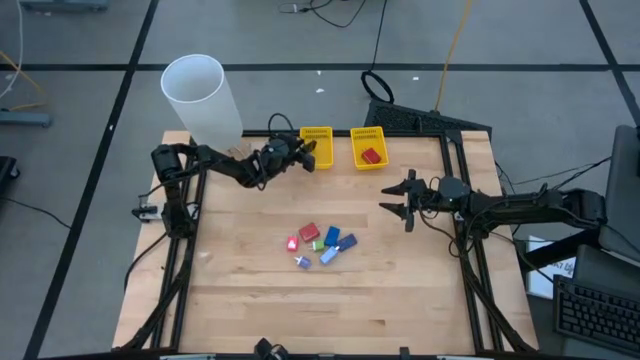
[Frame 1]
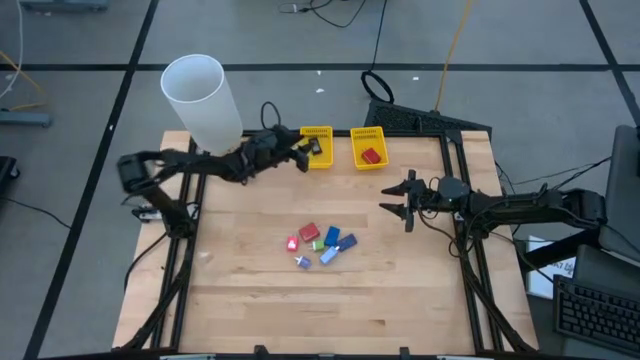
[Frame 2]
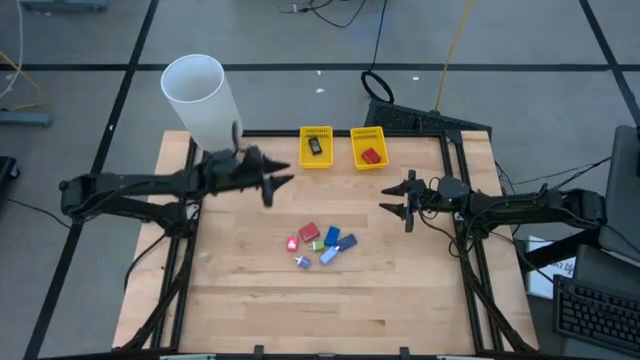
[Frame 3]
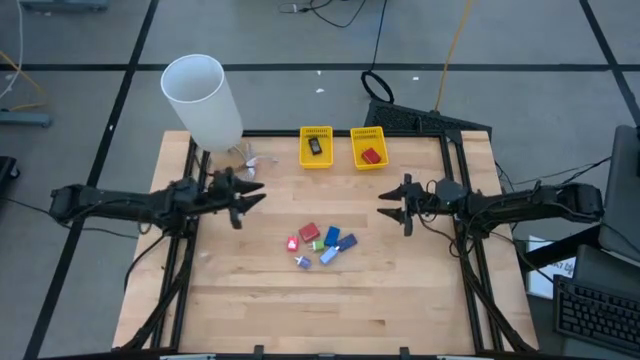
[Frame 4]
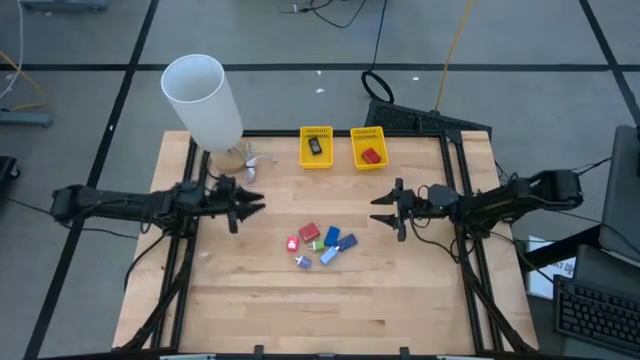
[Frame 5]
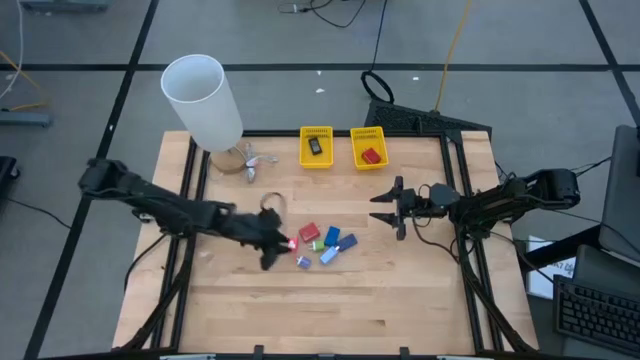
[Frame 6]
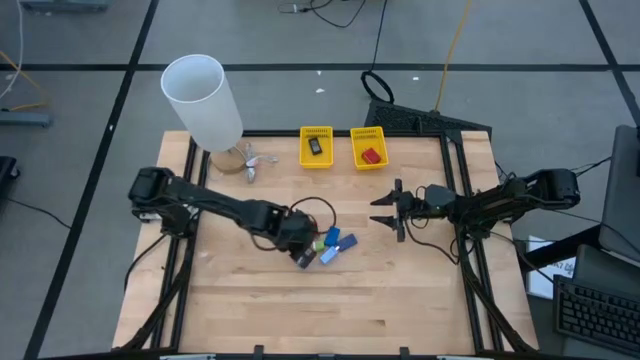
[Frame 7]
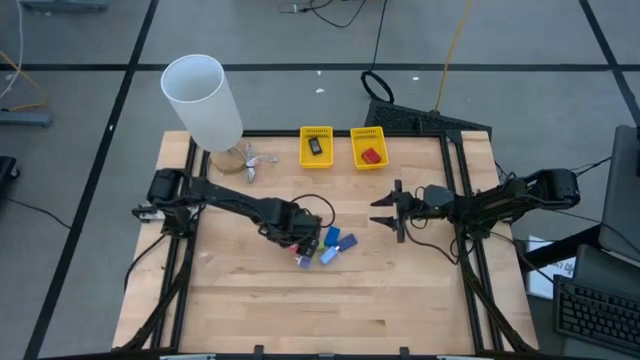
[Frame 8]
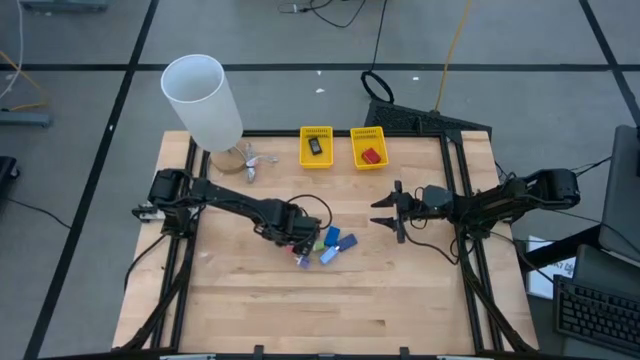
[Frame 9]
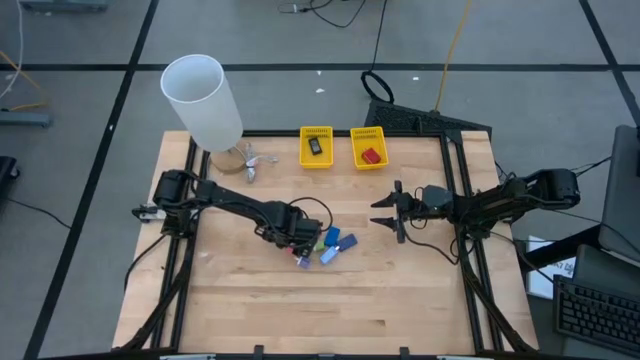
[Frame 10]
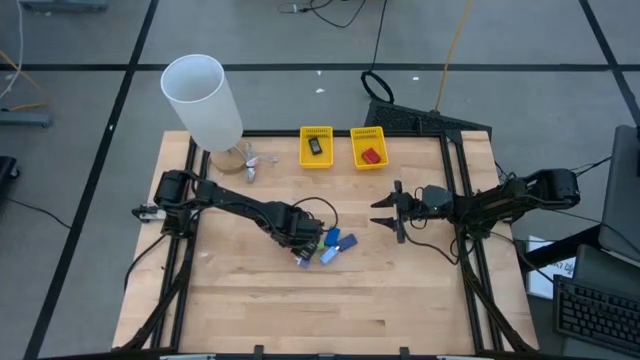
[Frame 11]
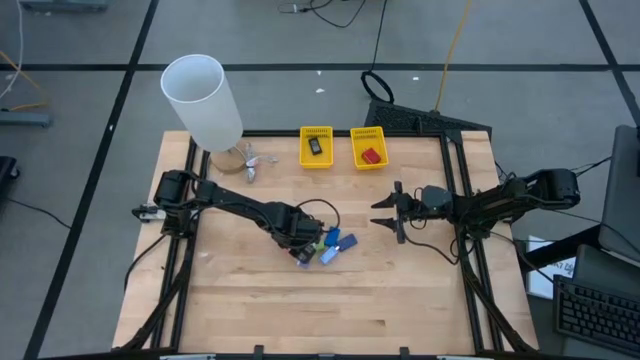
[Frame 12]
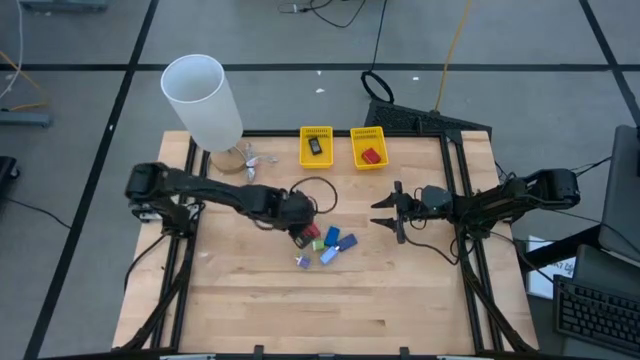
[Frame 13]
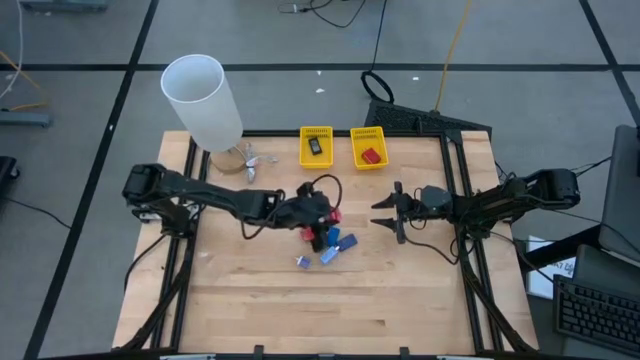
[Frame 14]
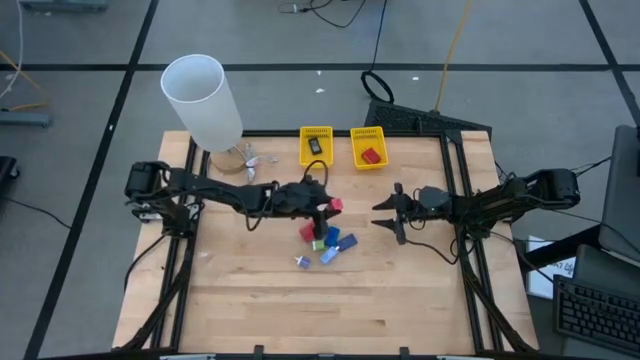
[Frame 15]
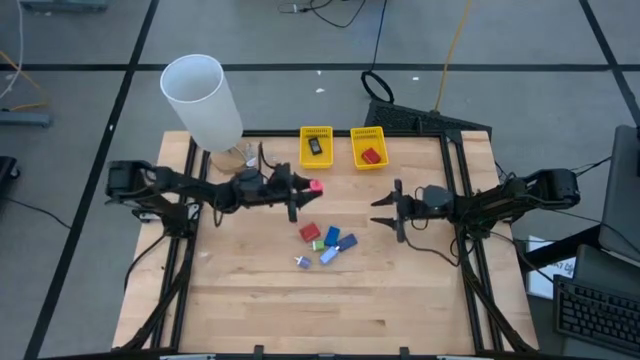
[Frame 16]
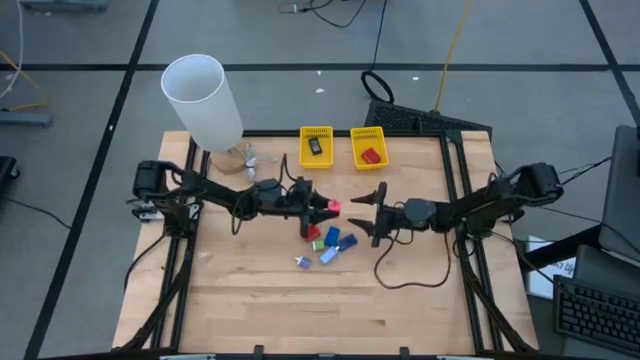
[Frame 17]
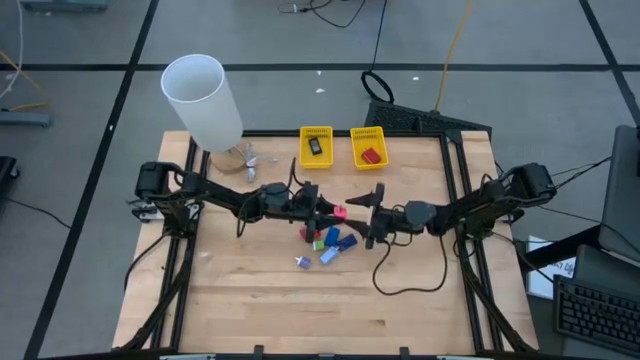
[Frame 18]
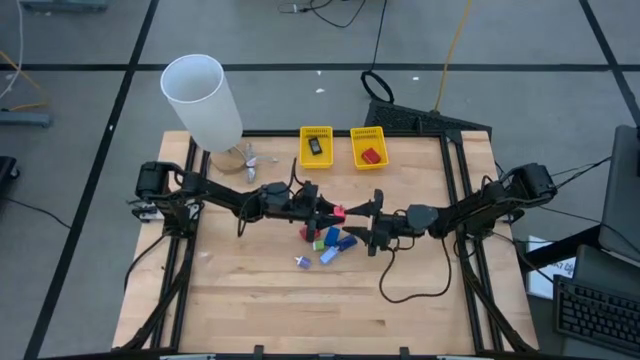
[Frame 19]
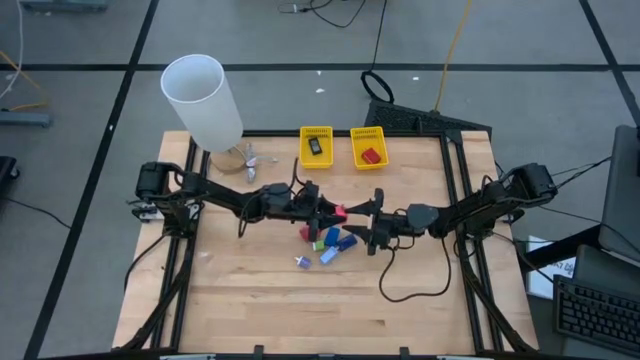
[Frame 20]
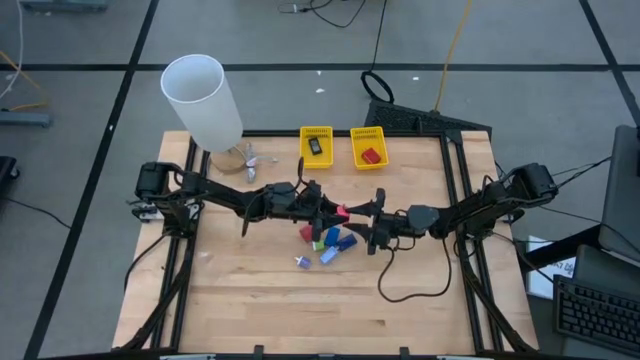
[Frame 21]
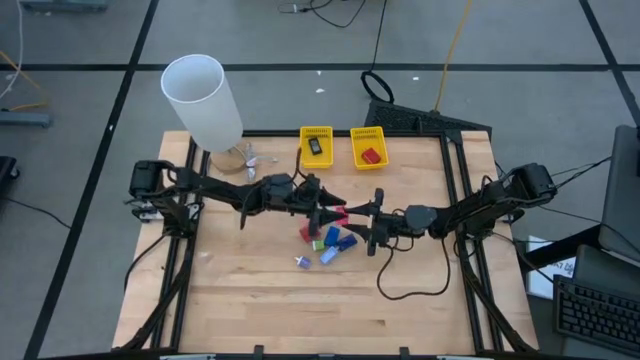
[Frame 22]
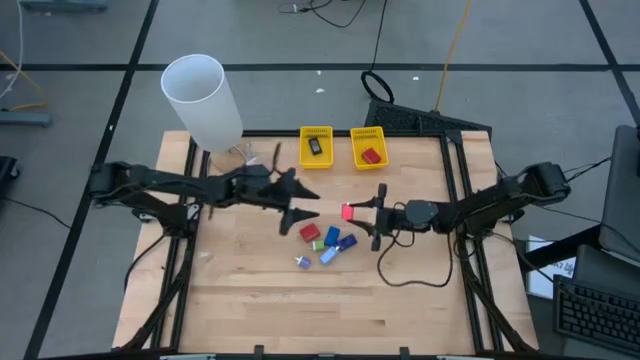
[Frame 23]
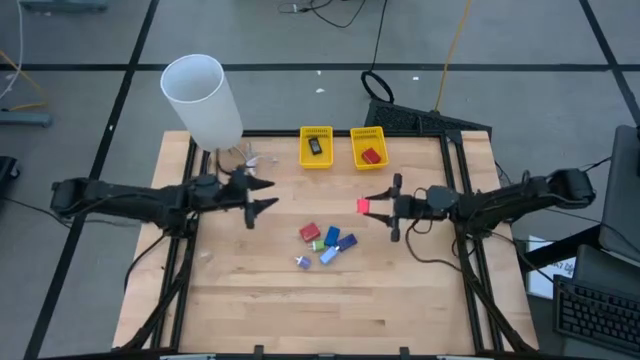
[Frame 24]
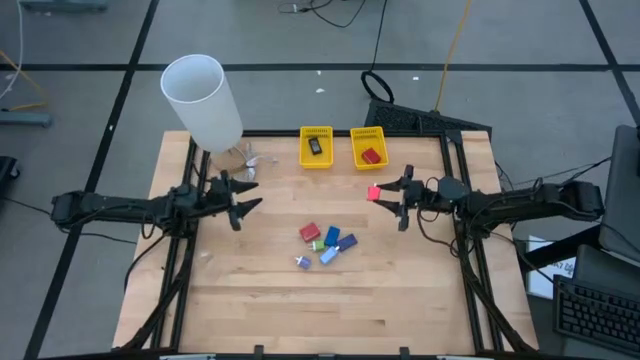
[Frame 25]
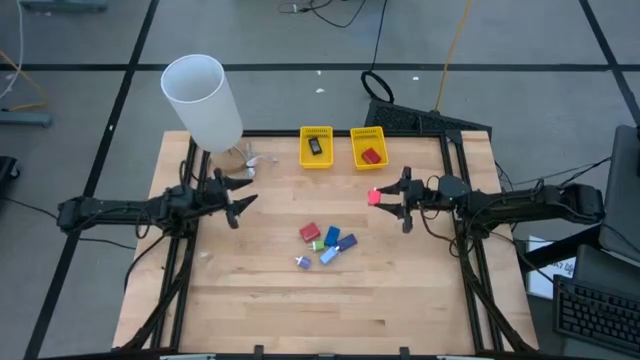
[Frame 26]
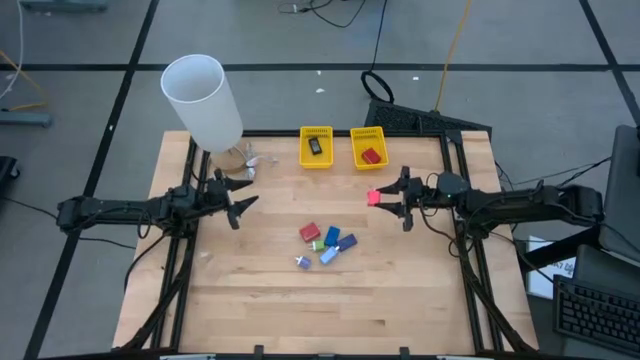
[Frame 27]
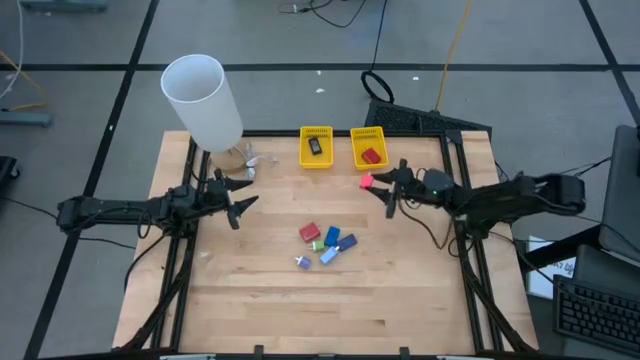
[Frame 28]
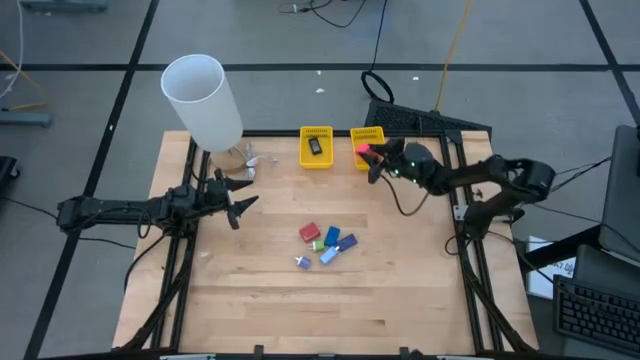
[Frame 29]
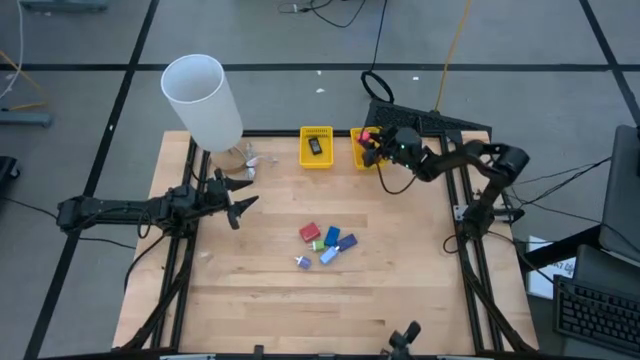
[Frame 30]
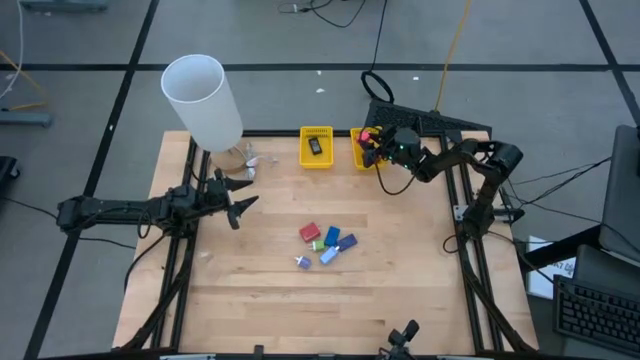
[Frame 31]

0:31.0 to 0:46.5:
Task: Pick & Place Office items
Put the pink charger adapter into the right yellow bin

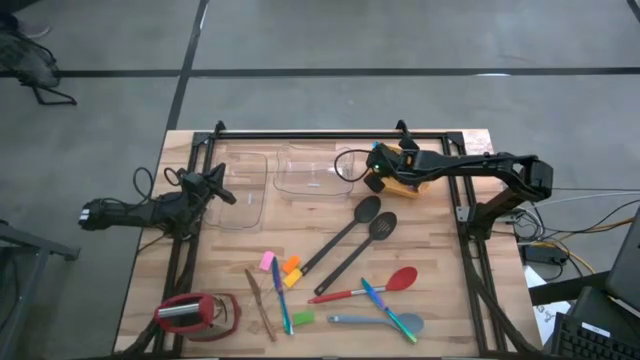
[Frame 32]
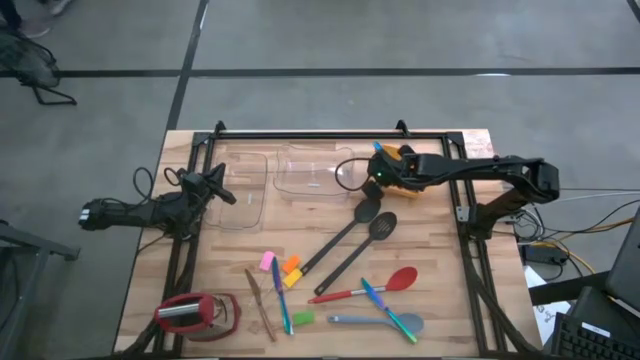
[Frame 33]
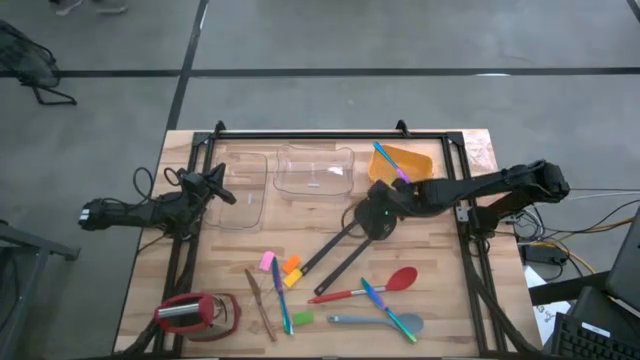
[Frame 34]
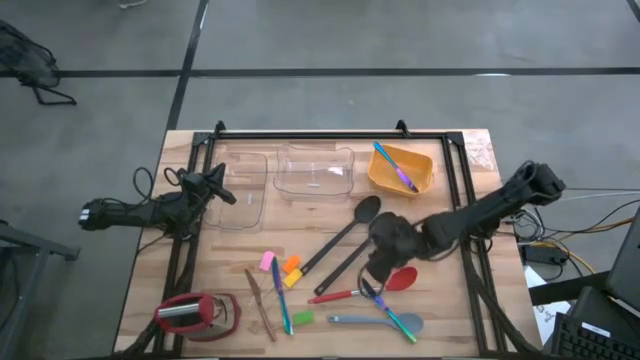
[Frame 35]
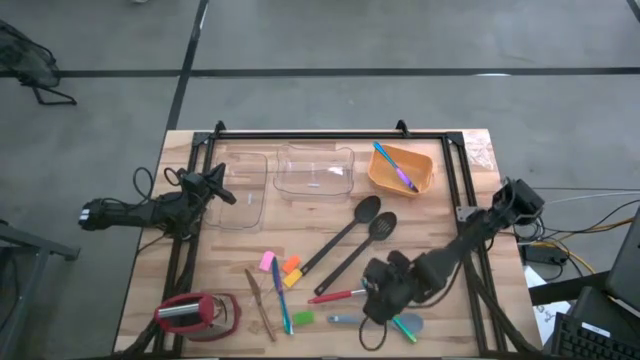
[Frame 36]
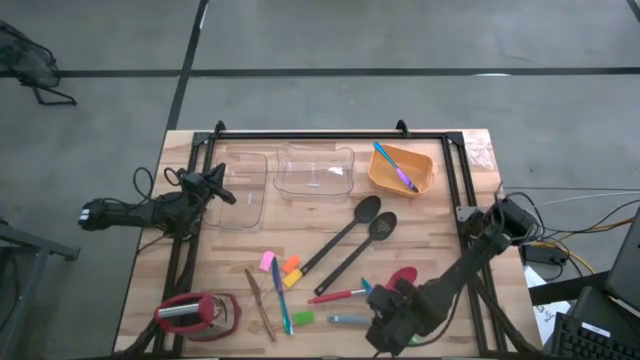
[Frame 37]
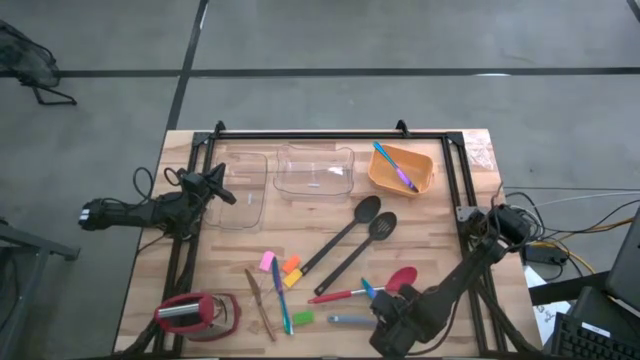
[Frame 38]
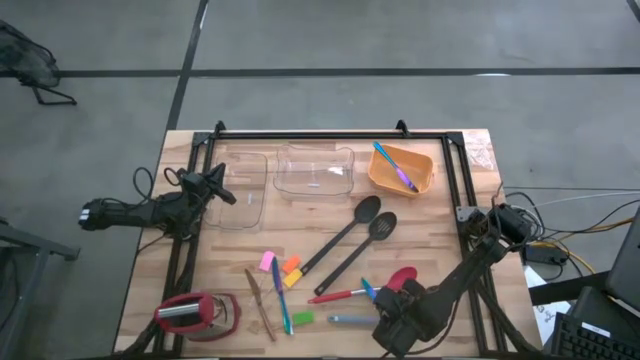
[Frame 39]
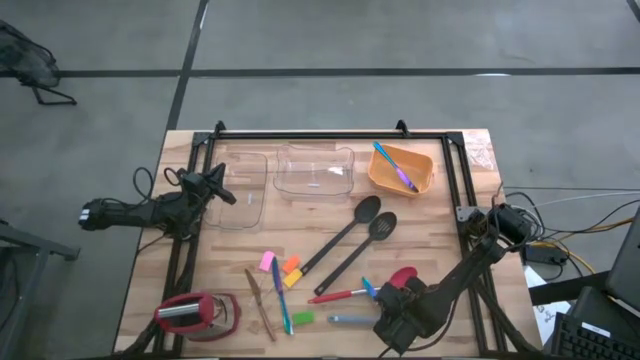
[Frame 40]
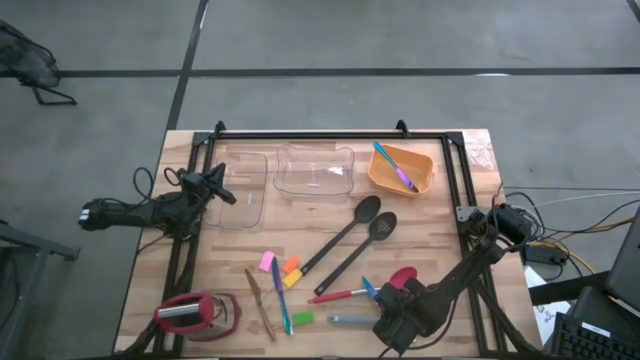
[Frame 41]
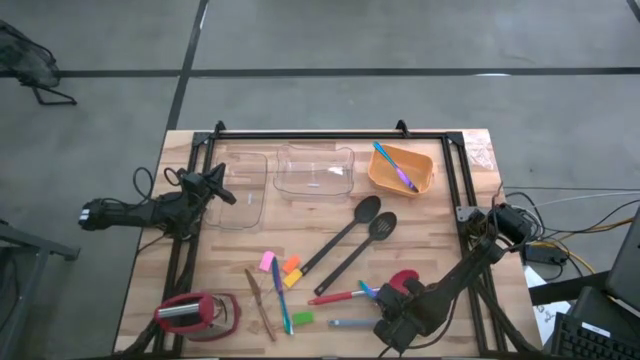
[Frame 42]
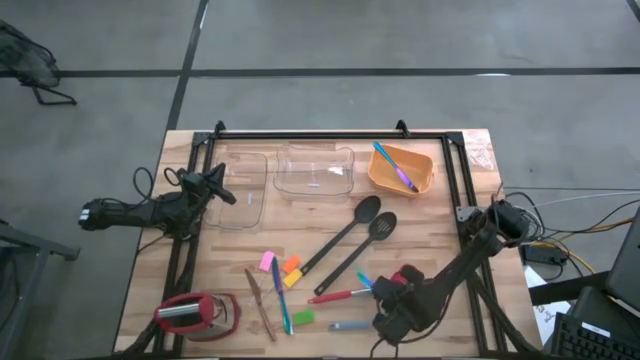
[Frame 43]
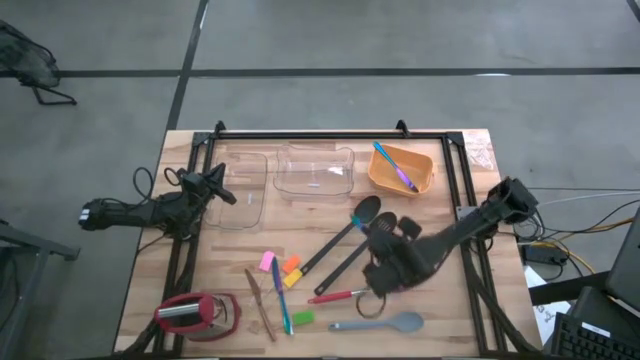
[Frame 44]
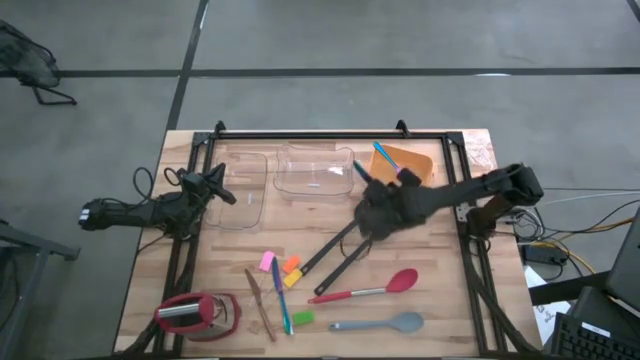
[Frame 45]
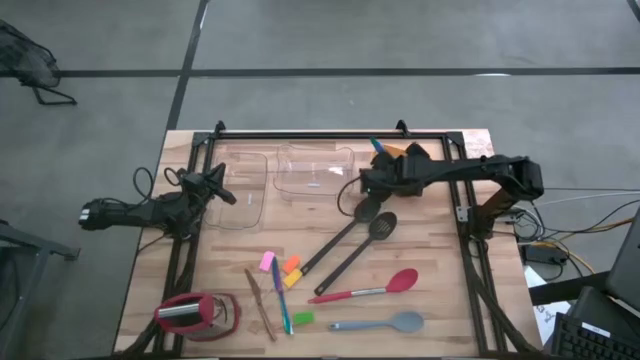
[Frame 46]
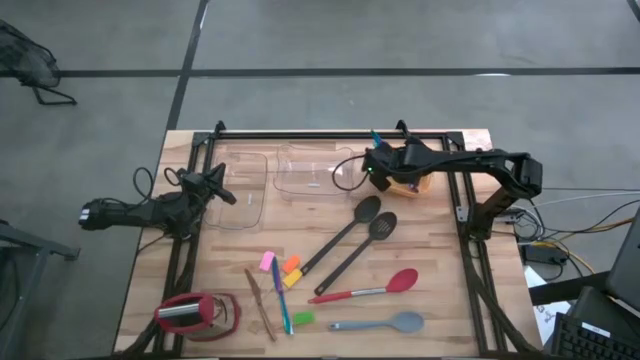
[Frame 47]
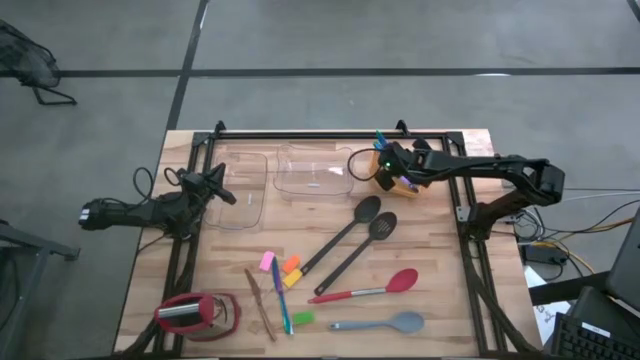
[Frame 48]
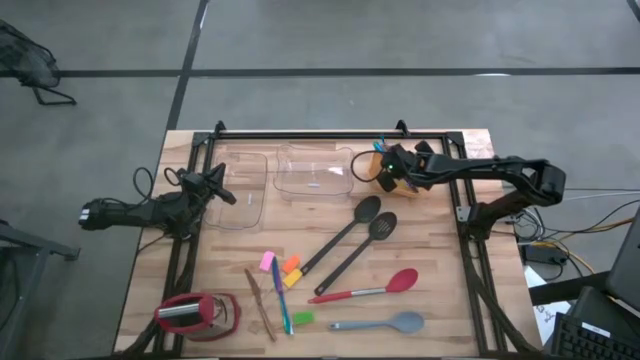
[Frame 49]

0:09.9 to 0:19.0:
Task: Sort silverware by color (type)
Put the right iridescent knife into the yellow bin
